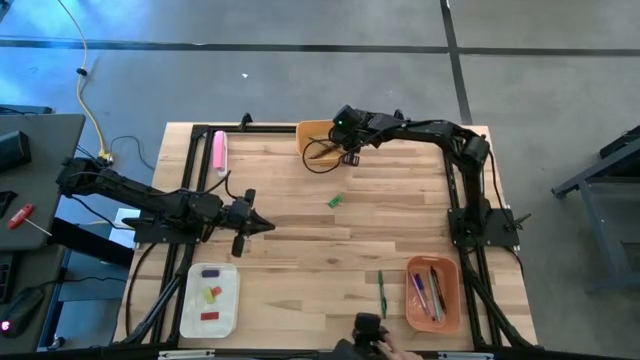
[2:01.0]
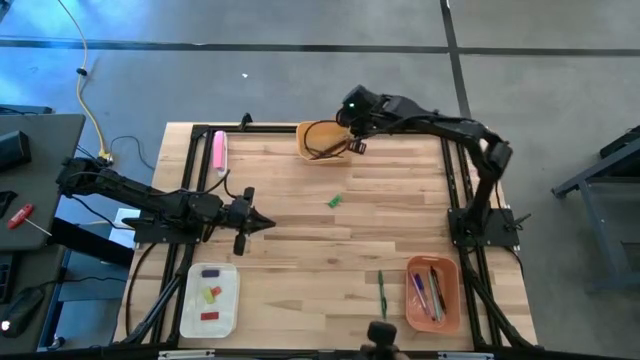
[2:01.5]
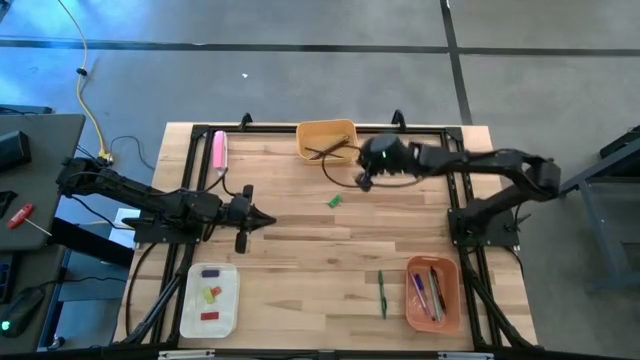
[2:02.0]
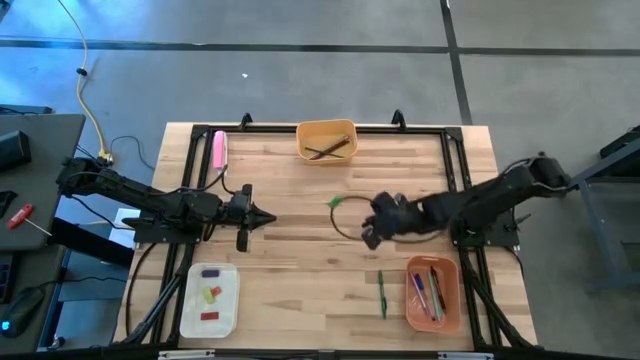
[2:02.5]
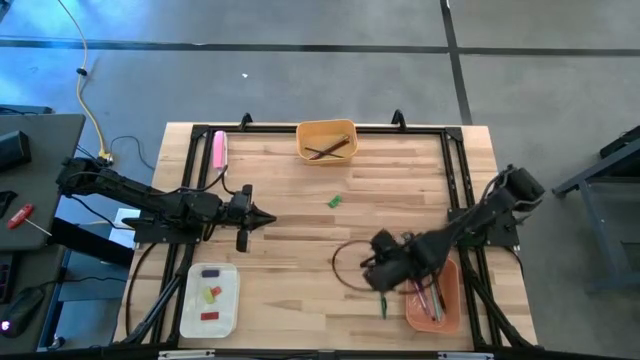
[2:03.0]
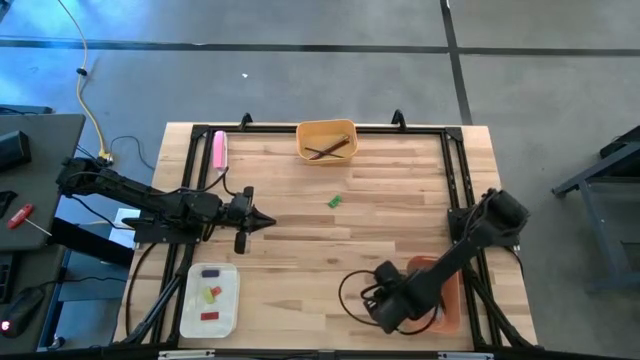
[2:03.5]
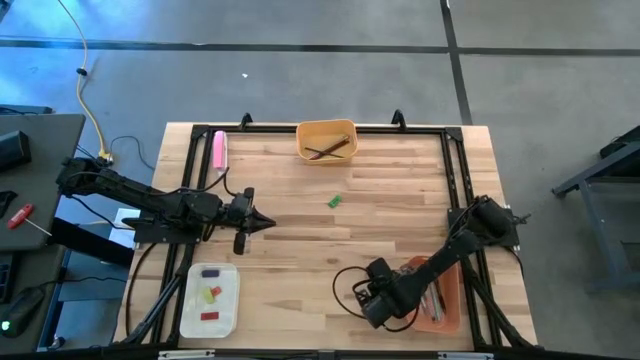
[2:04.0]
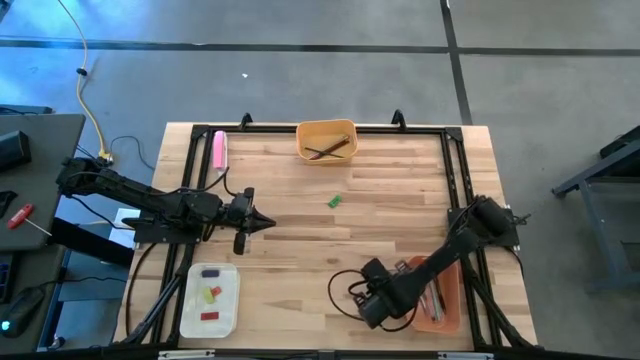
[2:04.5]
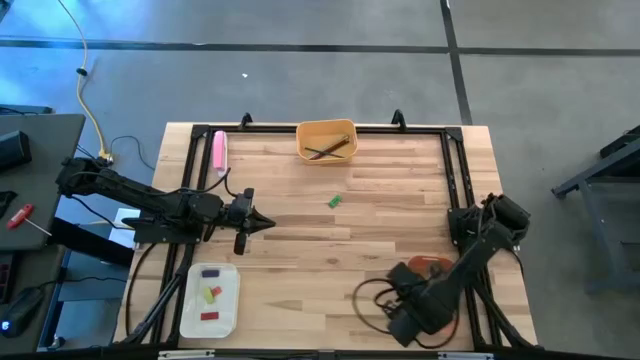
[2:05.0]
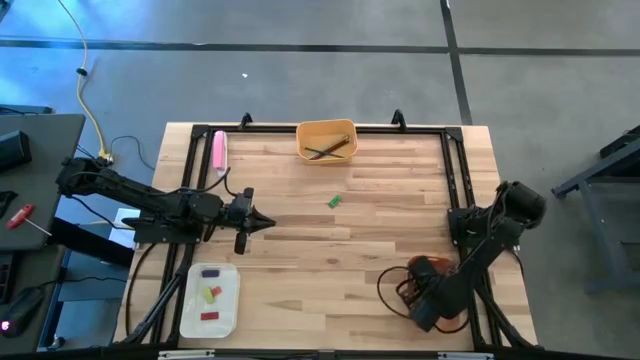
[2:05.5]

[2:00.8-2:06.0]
Task: Sort crayons/erasers/pens/pencils in bins
Put the green pen into the orange bin

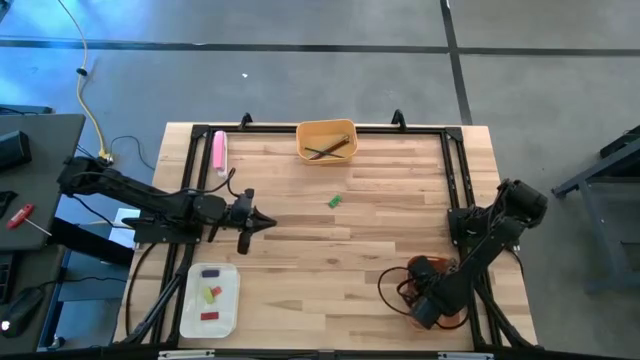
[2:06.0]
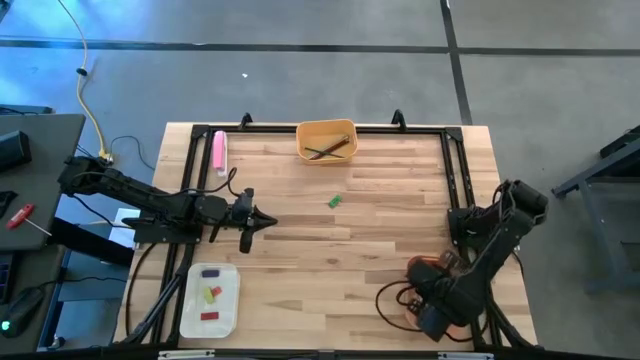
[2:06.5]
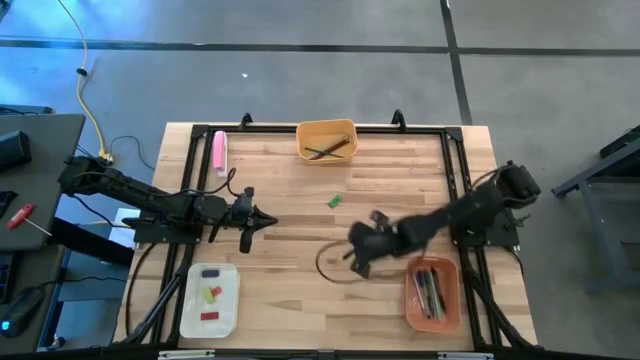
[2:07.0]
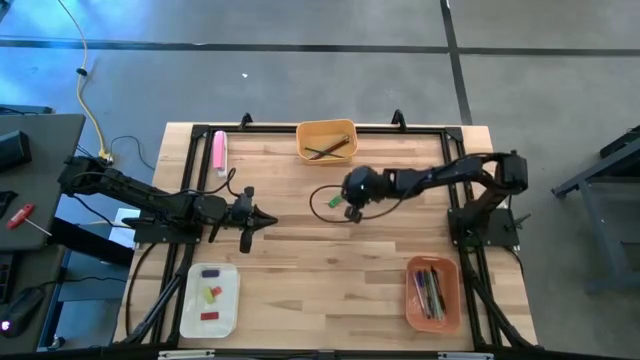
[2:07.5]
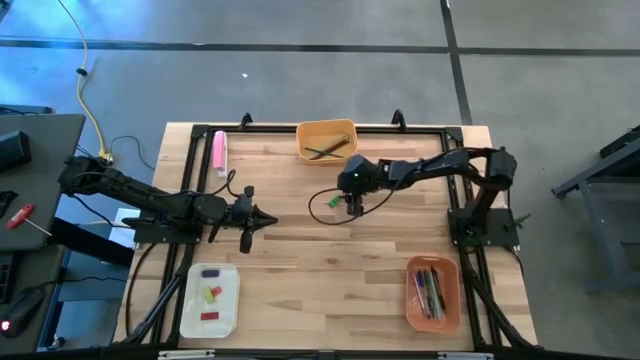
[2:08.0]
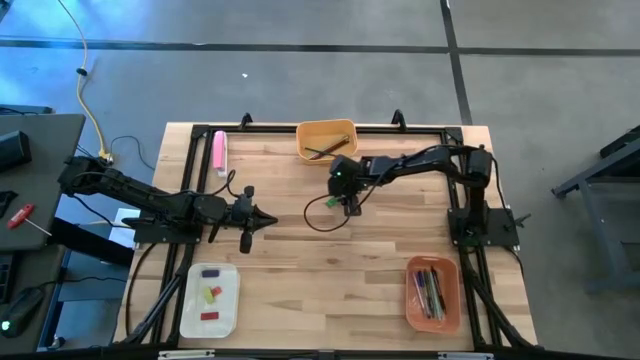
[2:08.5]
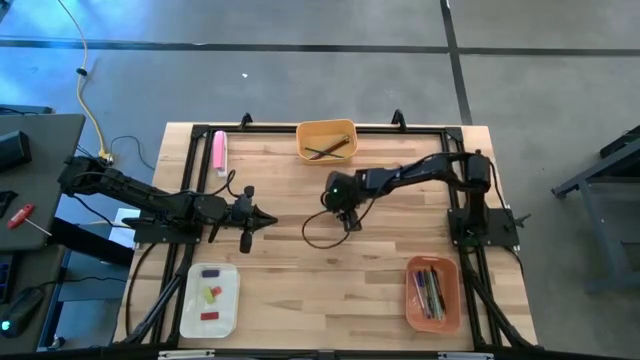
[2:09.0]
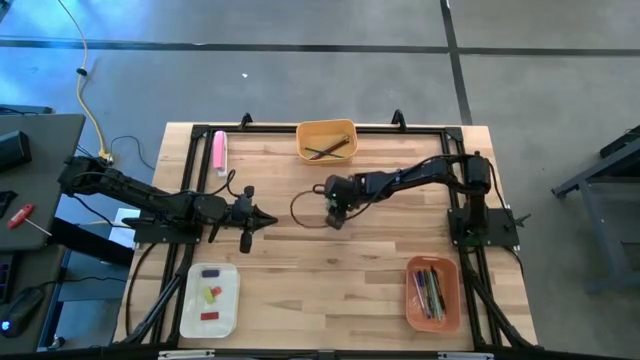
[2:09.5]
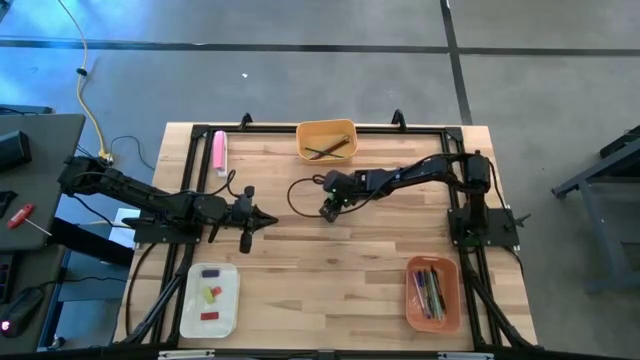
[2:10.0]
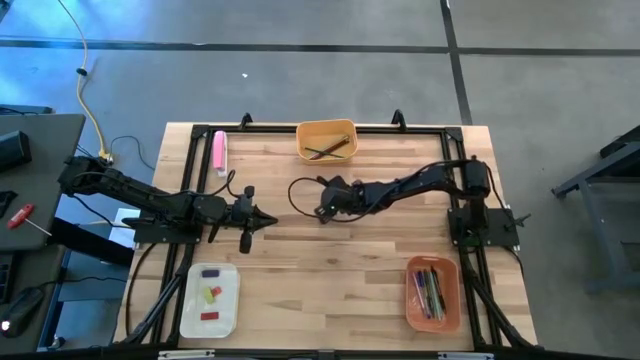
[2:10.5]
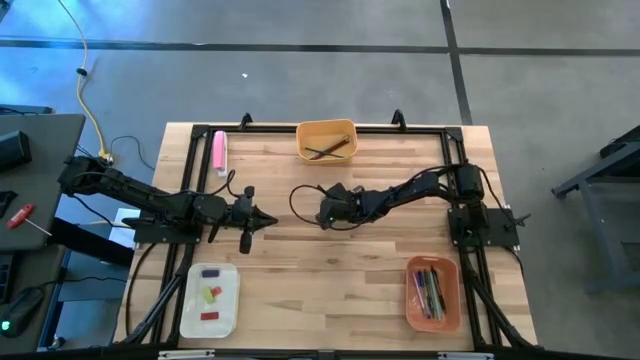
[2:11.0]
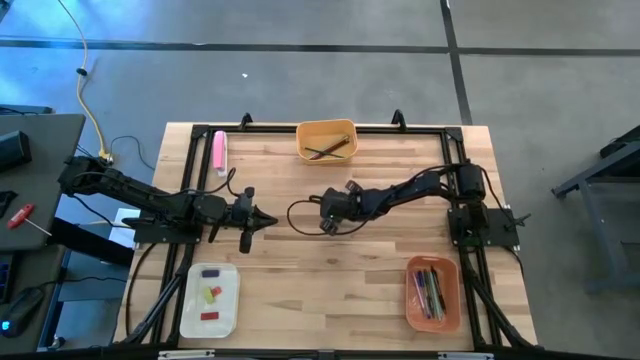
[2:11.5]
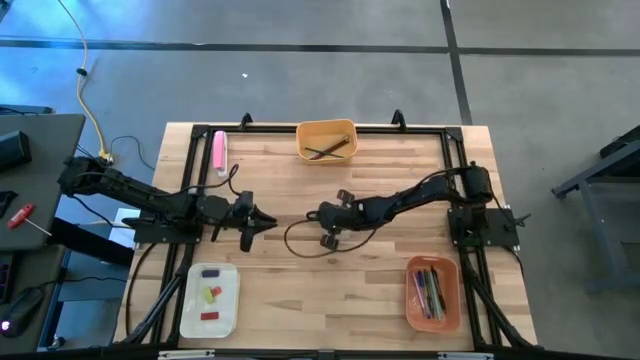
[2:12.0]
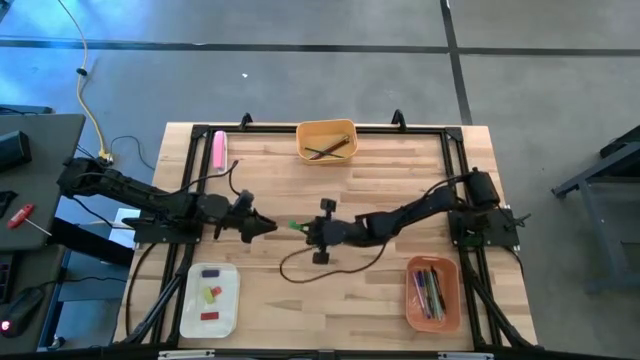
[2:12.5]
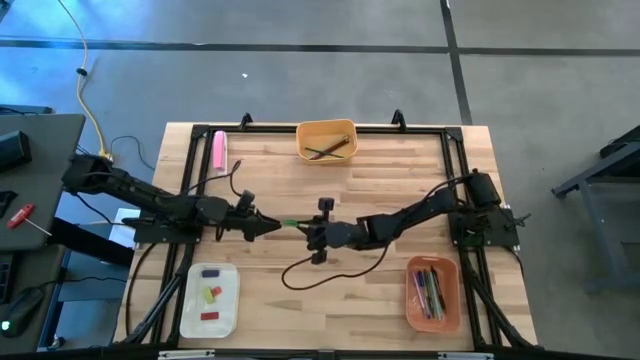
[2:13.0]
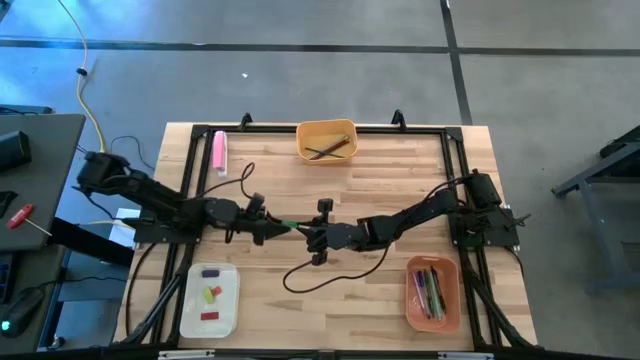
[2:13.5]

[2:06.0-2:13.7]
Put the green eraser into the white bin

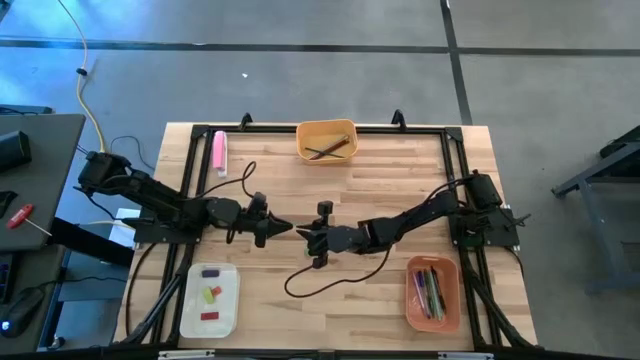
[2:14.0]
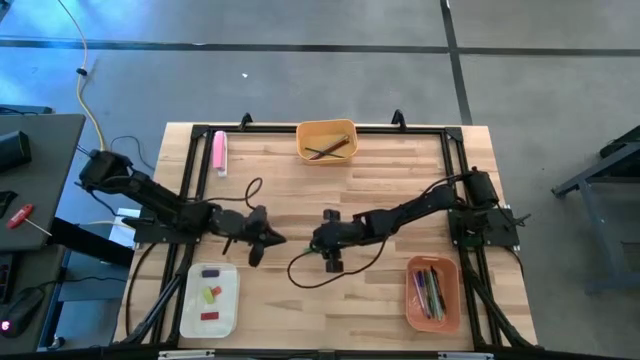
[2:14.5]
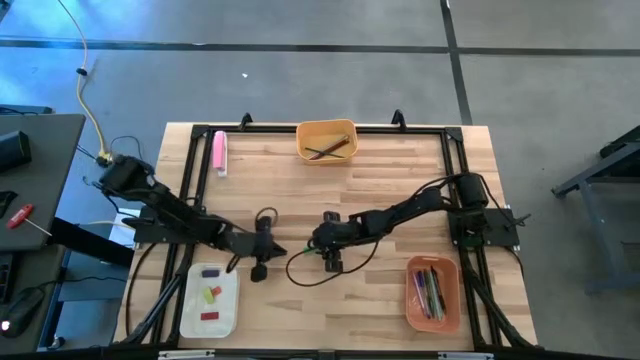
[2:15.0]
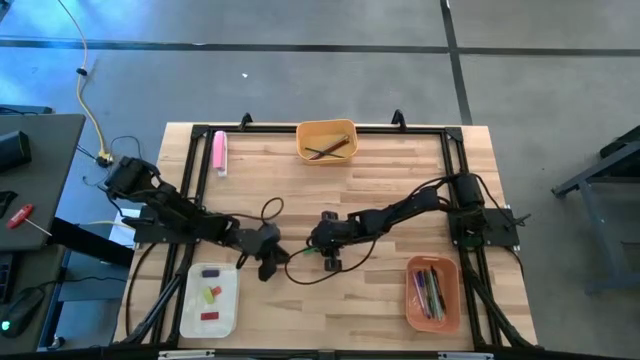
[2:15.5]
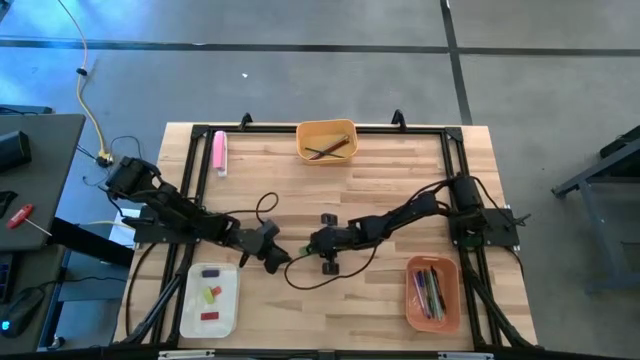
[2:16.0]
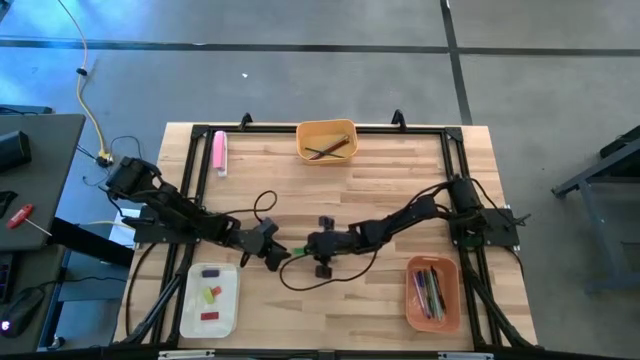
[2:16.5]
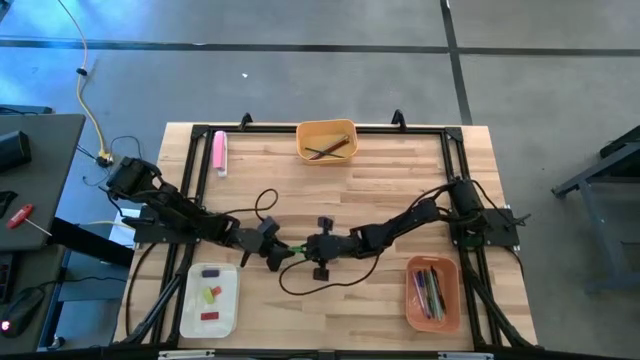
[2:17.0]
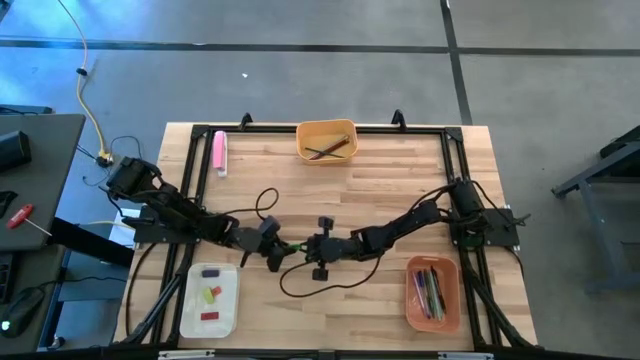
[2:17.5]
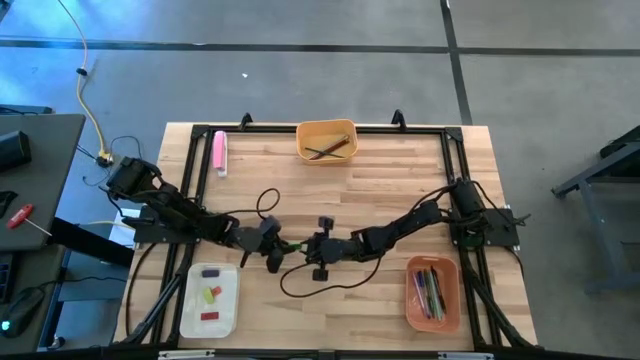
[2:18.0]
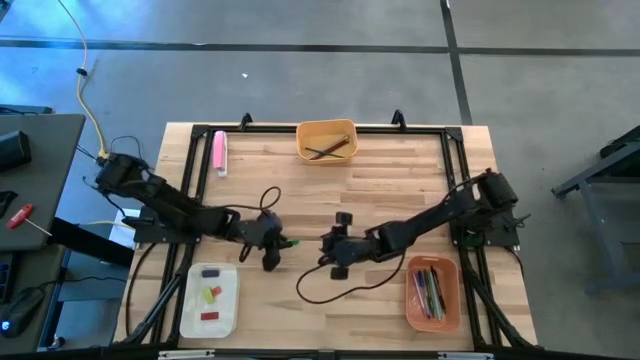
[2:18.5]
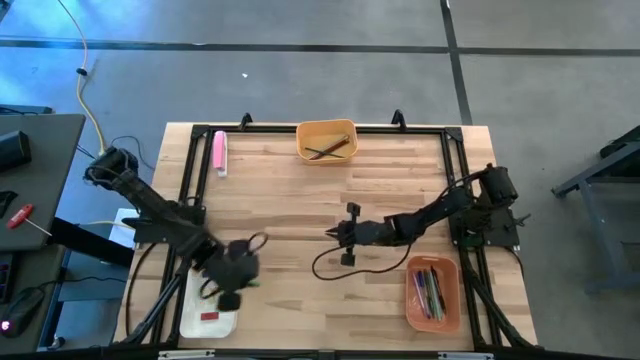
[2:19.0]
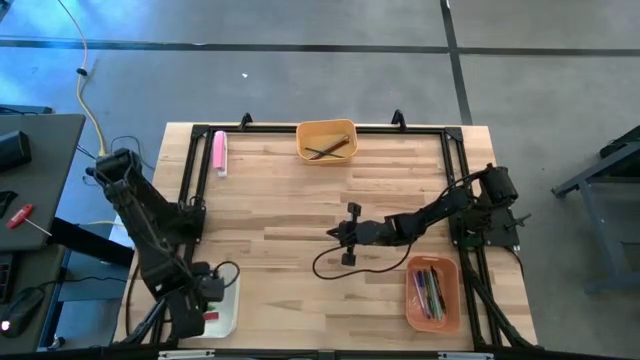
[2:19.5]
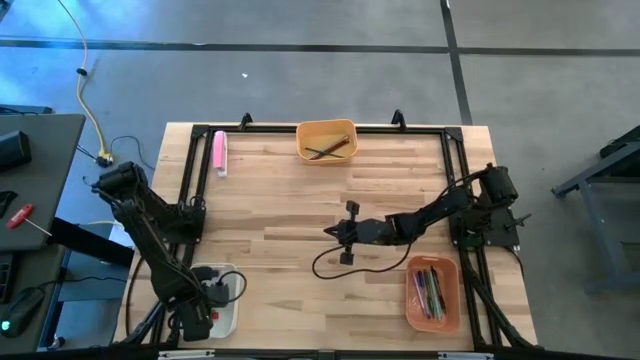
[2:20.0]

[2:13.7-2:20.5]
Put the green eraser into the white bin

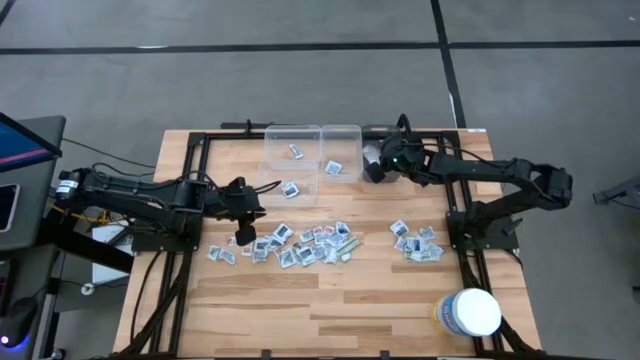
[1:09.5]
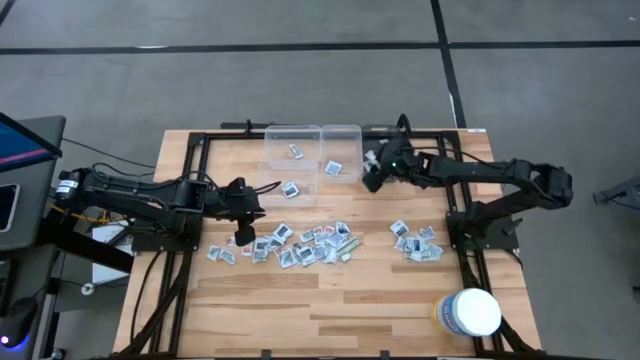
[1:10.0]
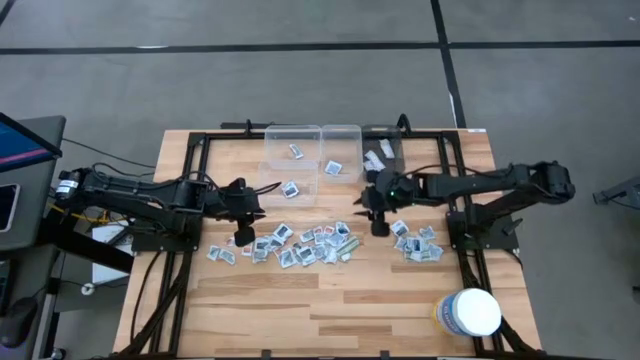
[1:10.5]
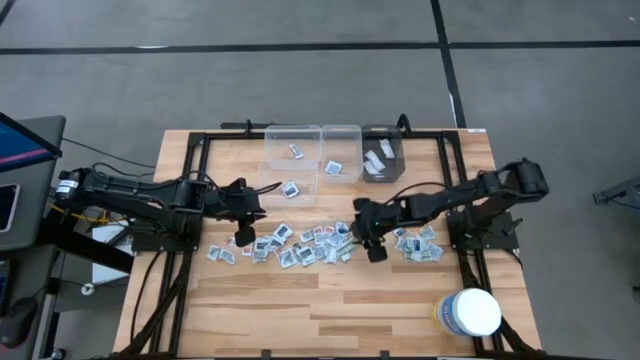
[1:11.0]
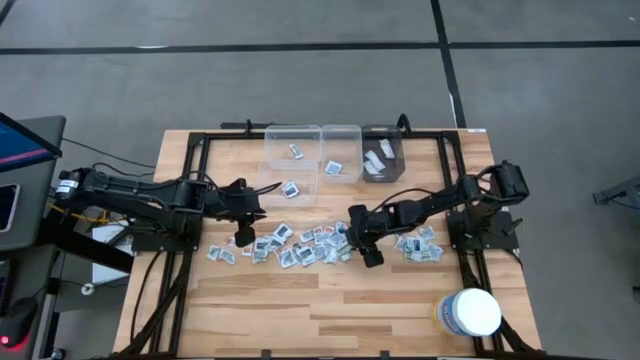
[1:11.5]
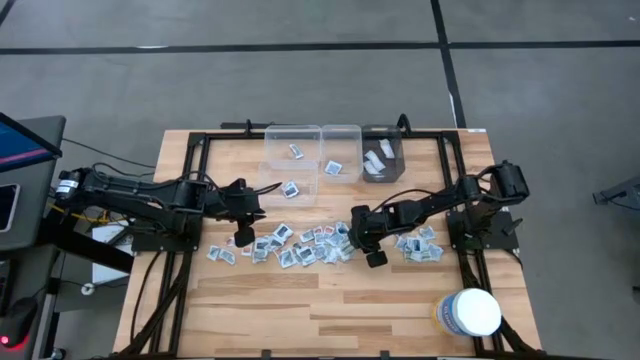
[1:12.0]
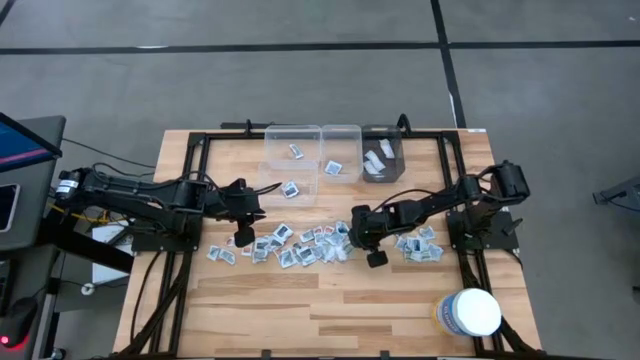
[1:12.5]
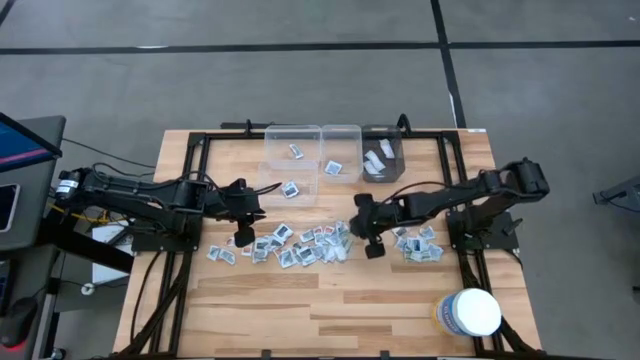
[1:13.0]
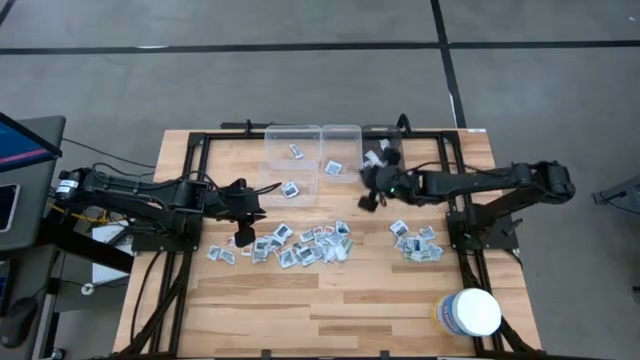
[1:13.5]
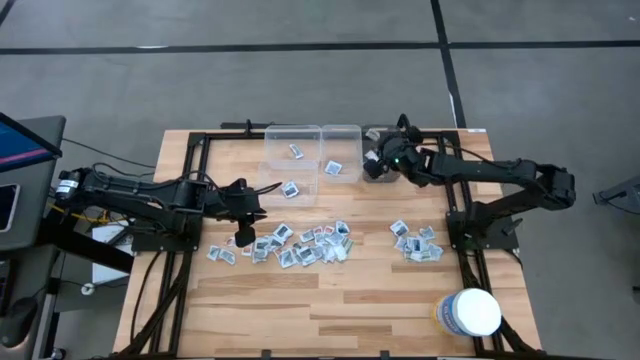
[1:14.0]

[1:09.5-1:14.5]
Task: Pick & Place First Aid Supplies
Put the bandage pack into the black transparent bin
